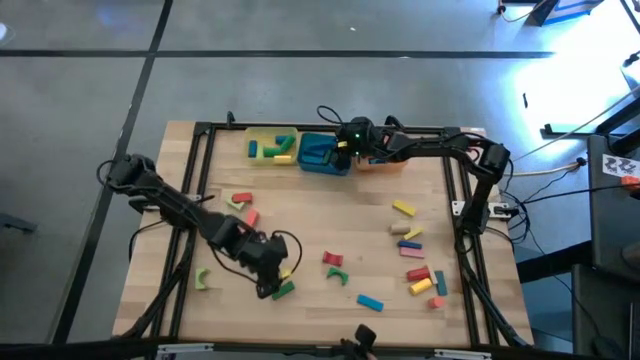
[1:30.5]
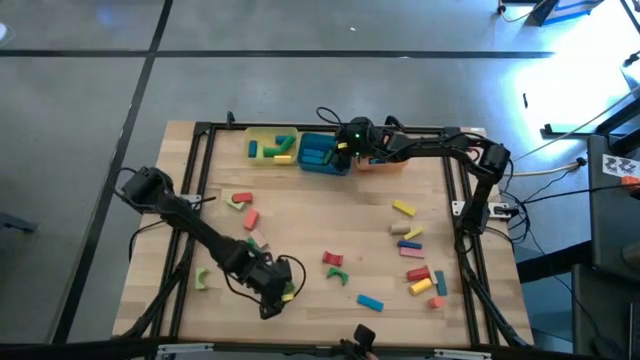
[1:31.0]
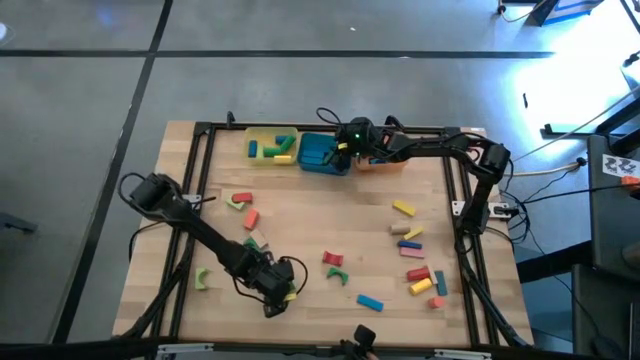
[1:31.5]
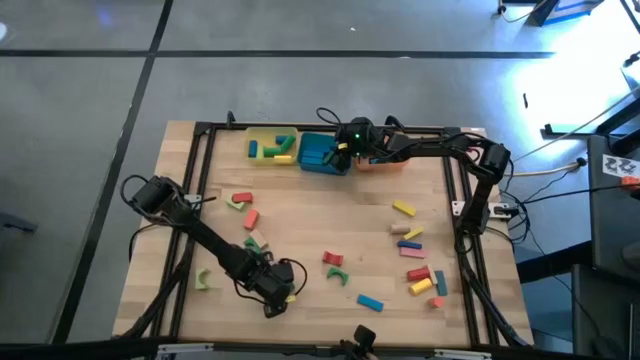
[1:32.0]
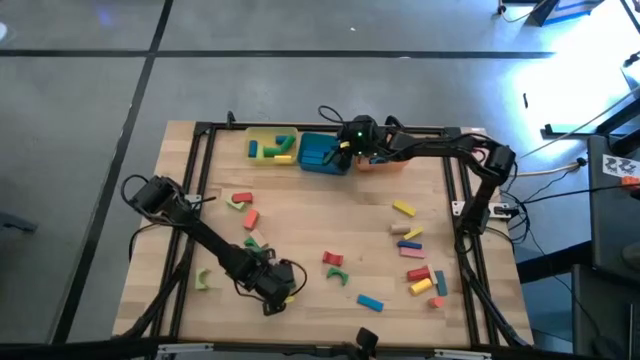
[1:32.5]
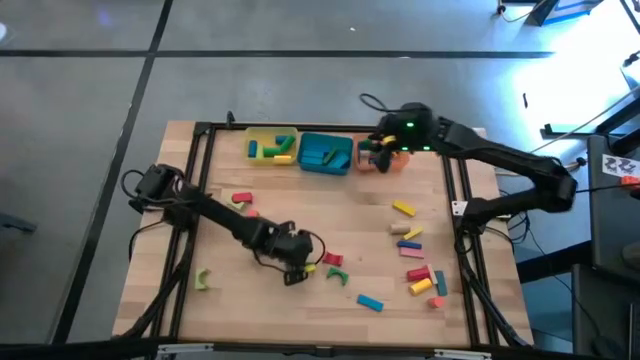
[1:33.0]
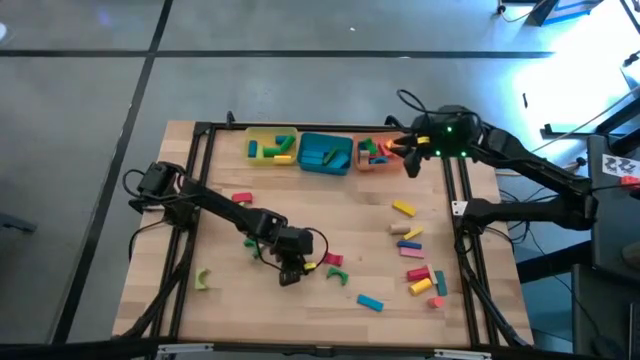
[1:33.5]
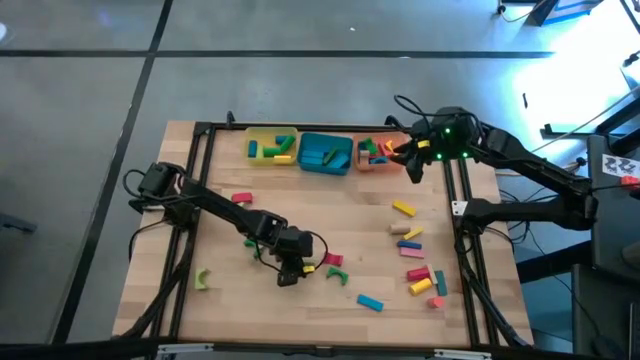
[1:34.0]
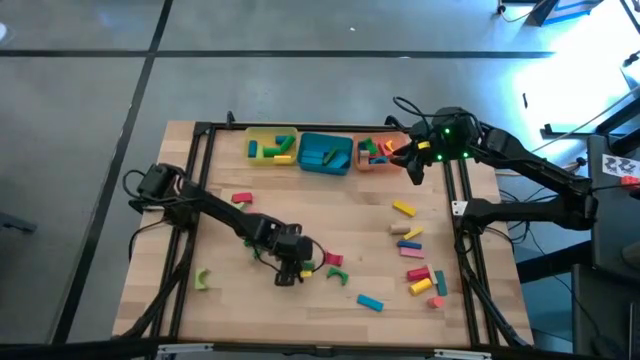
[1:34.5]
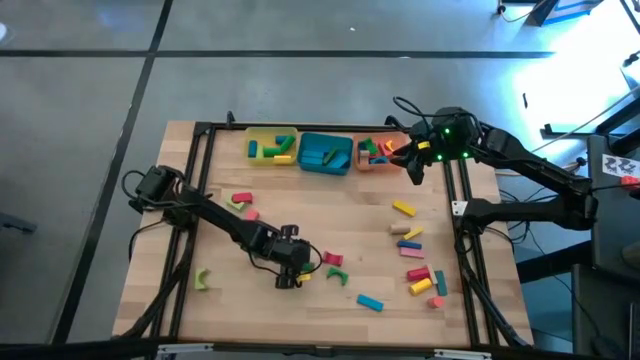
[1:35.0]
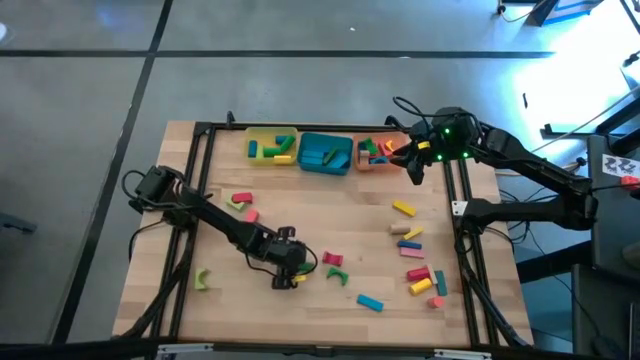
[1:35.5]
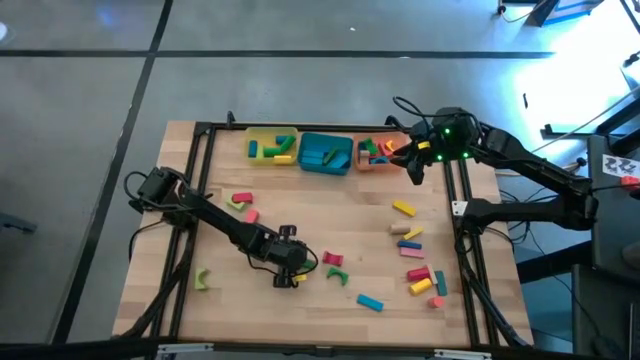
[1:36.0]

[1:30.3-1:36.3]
Task: Sort blocks by size
Put the green rectangle block into the blue bin

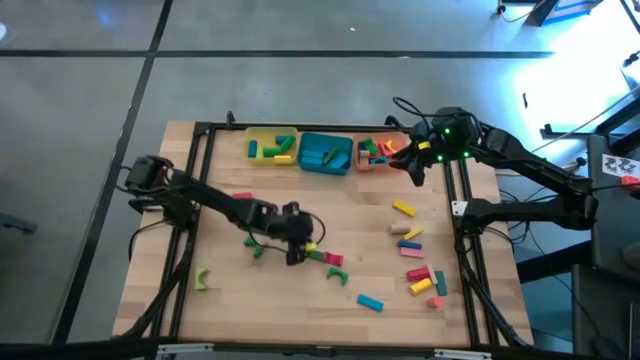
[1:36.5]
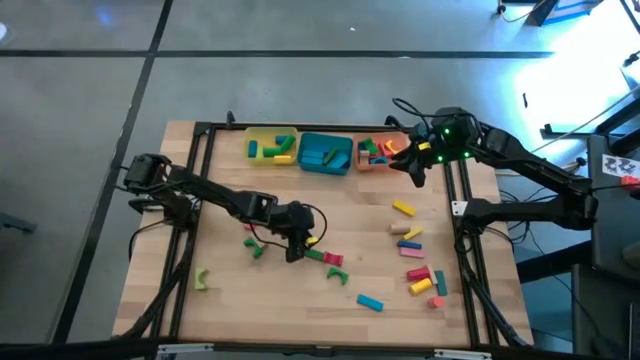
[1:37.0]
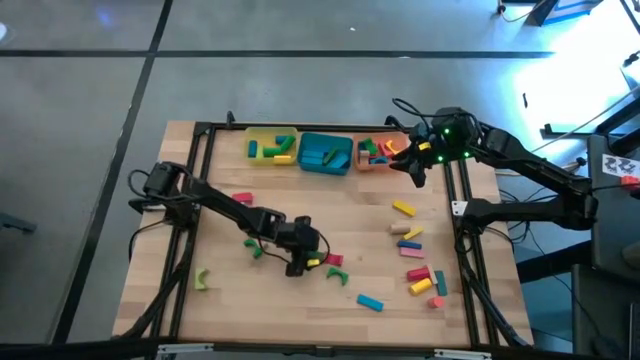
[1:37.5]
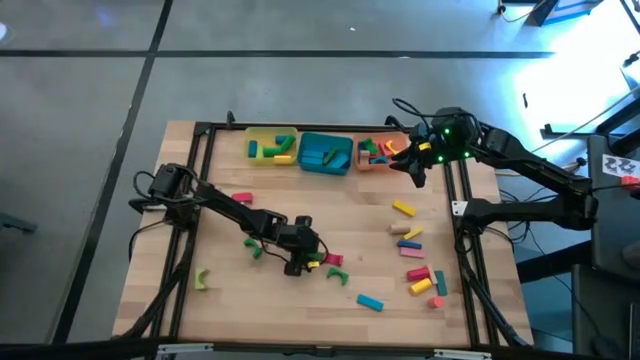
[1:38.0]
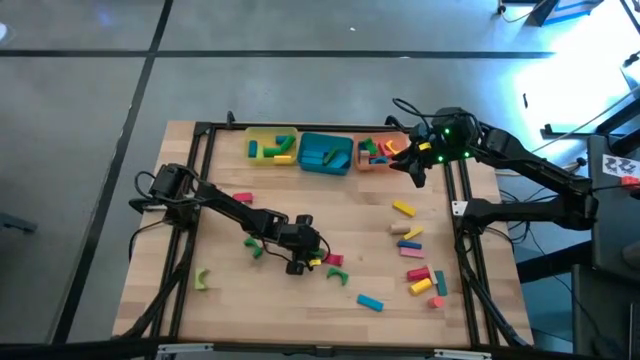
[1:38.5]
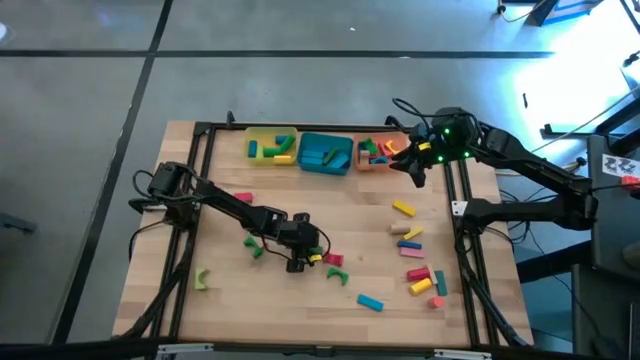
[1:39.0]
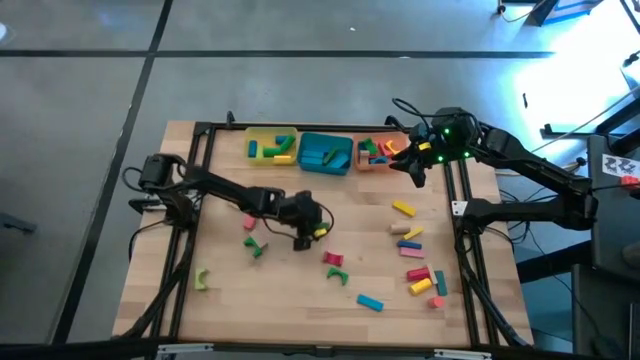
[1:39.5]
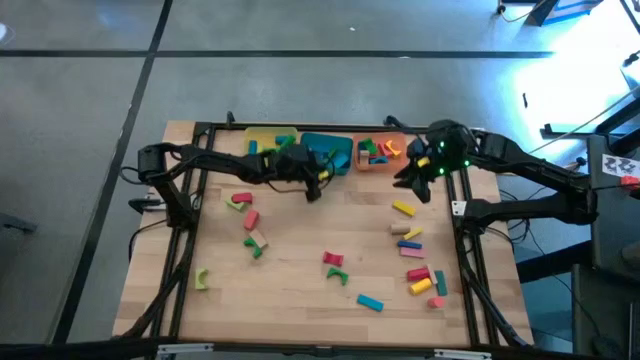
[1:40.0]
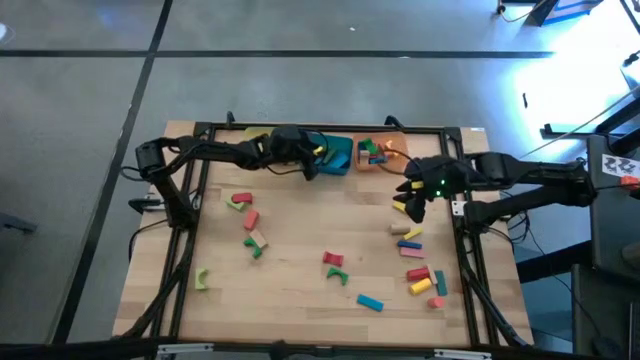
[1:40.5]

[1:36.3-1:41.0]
Put the green rectangle block into the blue bin

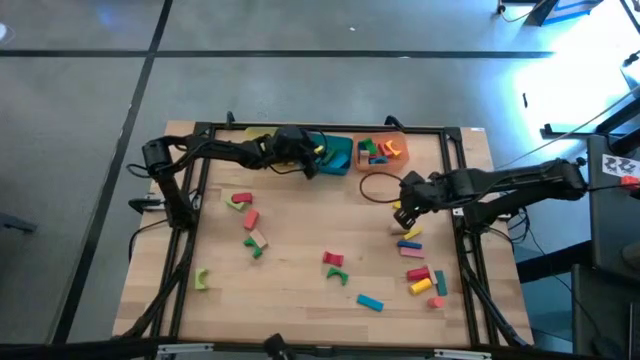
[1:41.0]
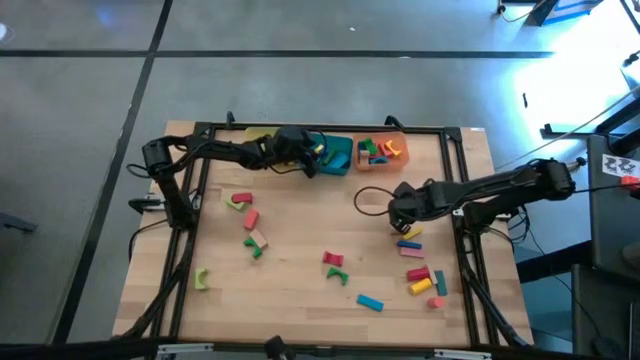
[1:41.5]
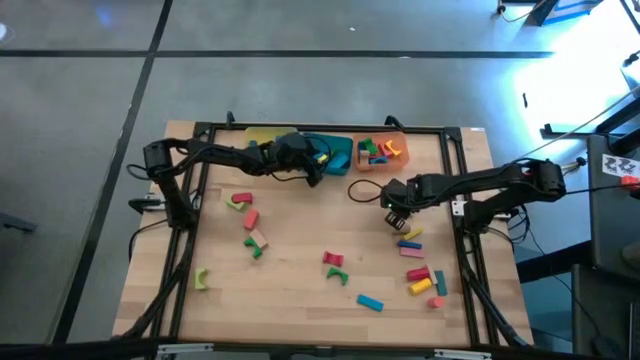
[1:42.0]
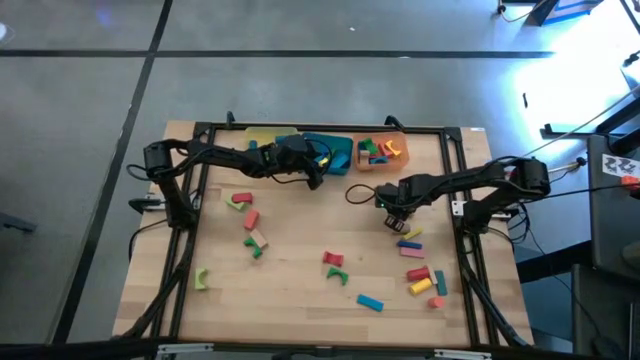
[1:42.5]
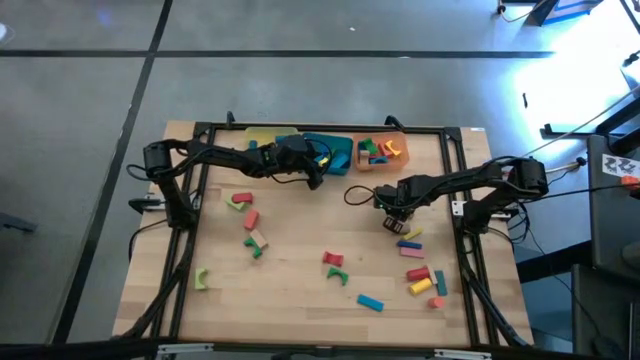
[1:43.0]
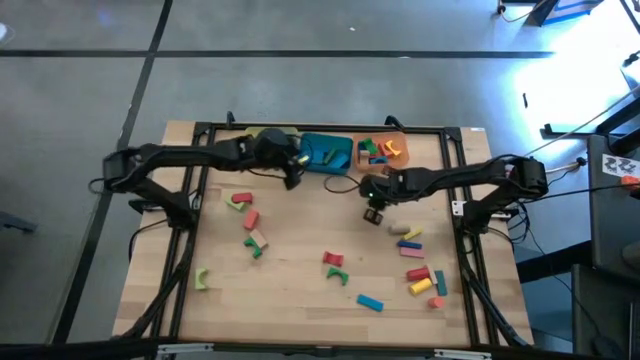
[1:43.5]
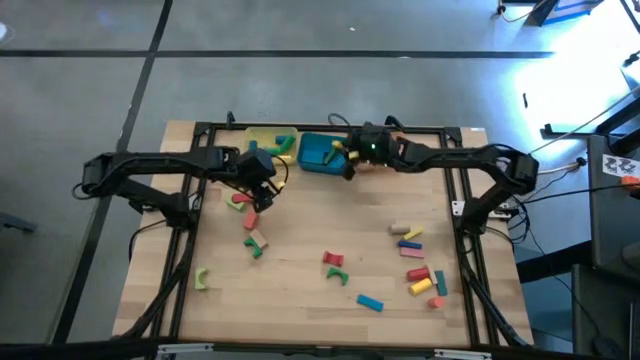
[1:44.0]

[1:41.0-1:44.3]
Put the yellow rectangle block into the blue bin

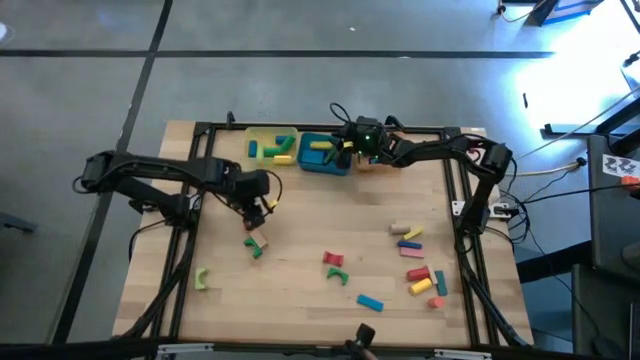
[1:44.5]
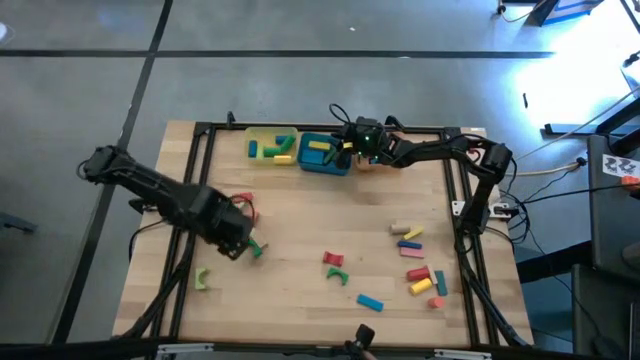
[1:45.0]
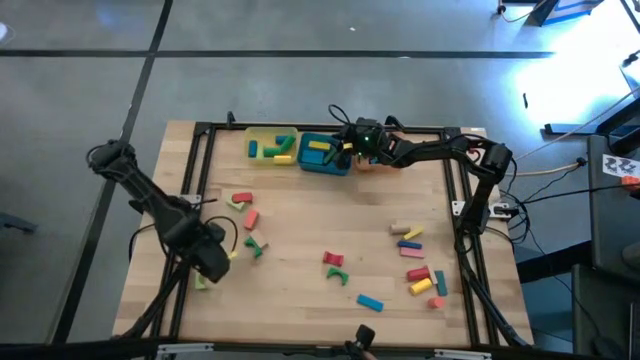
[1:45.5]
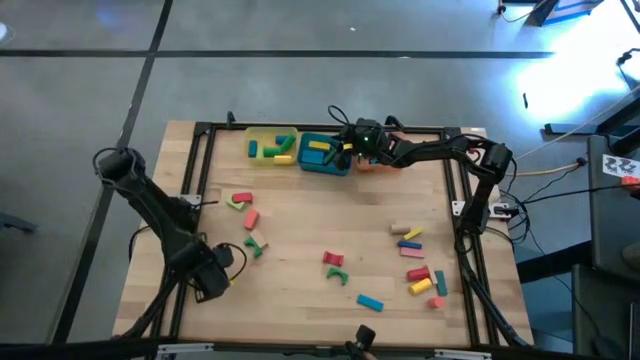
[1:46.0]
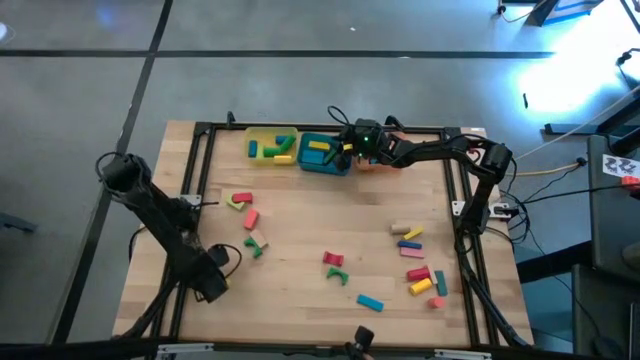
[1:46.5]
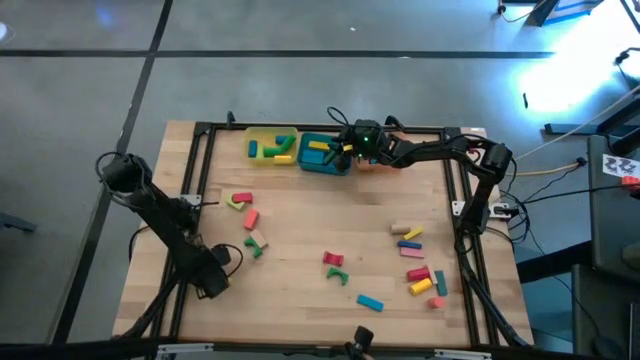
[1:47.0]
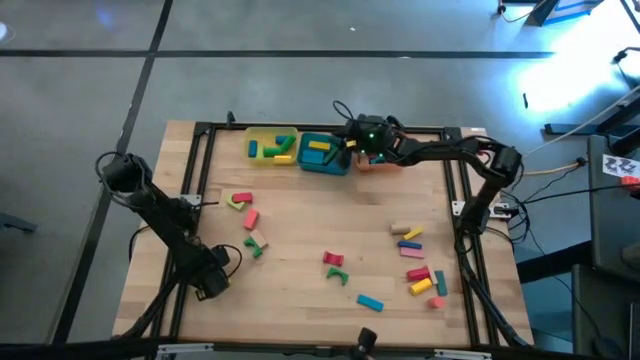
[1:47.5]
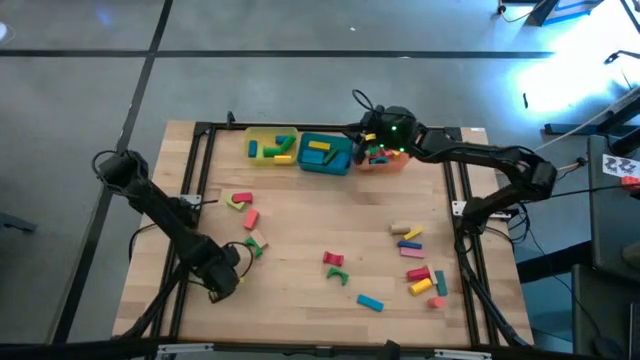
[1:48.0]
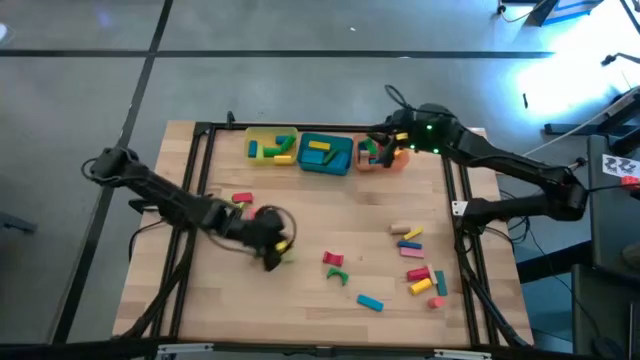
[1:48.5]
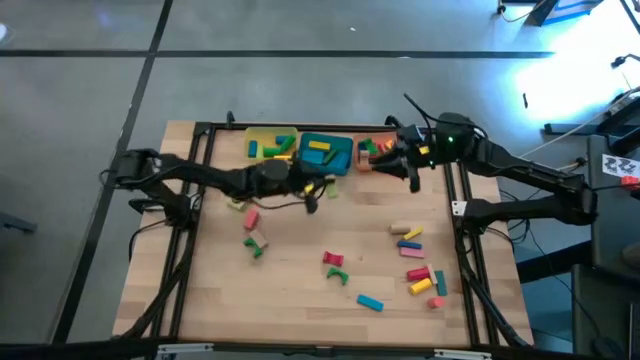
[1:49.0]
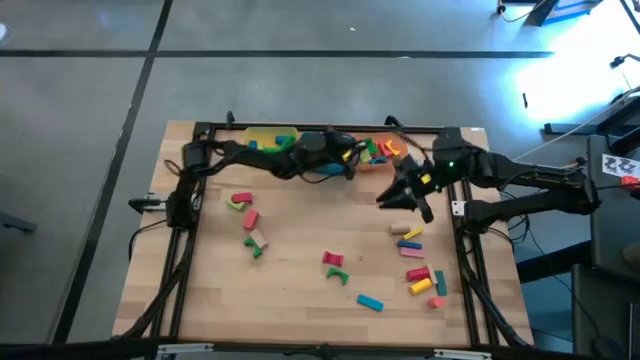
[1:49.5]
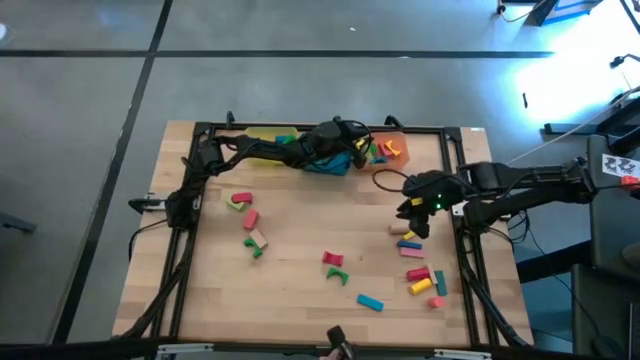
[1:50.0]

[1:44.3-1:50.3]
Put the light green arch block in the orange bin

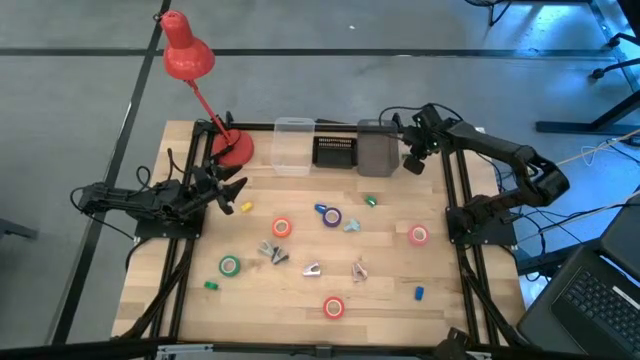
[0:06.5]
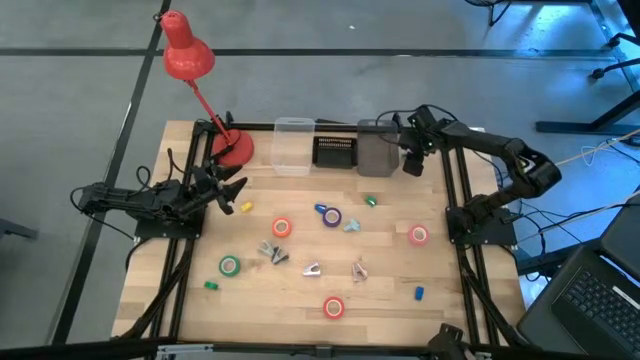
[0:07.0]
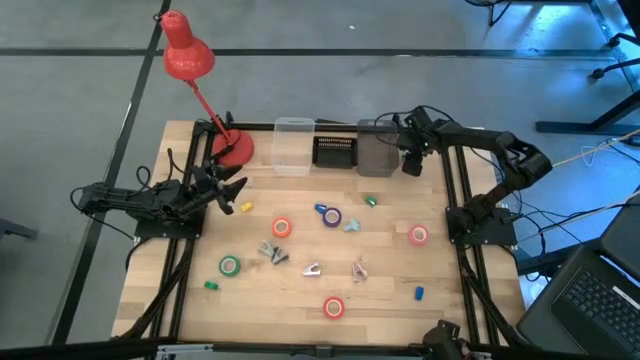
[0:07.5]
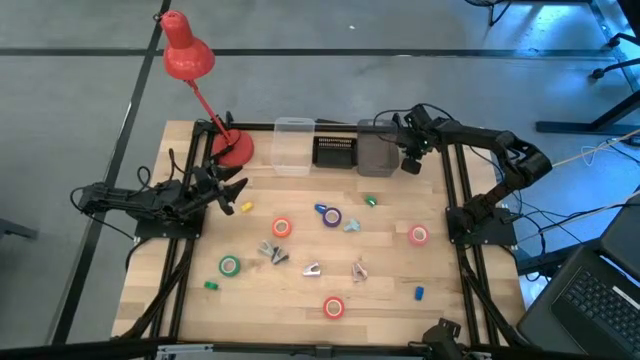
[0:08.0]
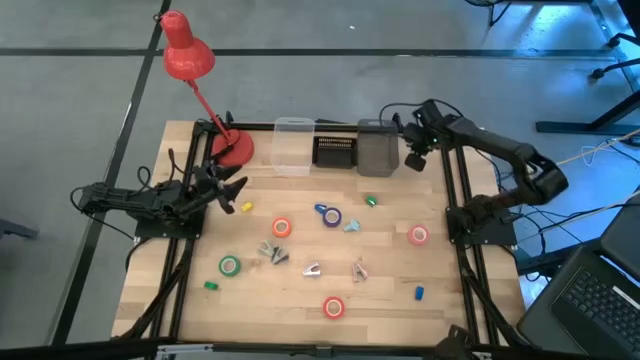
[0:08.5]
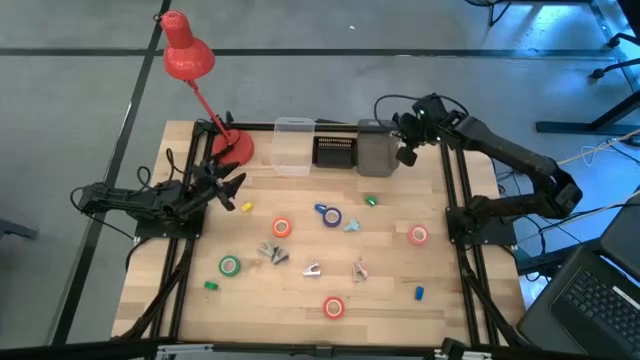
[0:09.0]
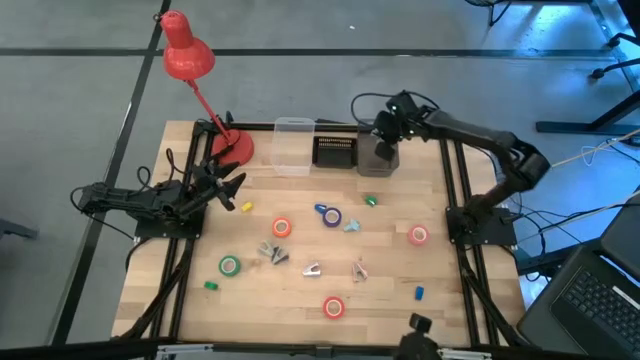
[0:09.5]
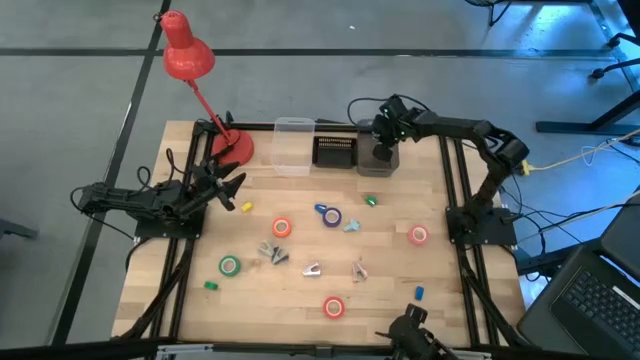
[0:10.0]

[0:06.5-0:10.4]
Task: Pick and place Stapler, Stapler remover, tape
Put the top blue staple remover into the right black bin
